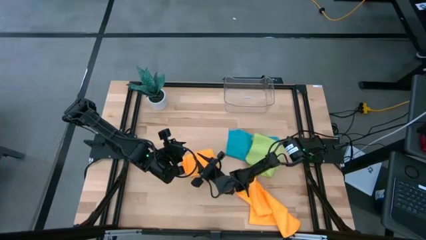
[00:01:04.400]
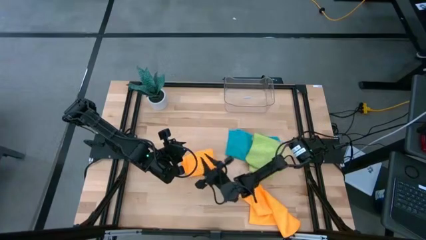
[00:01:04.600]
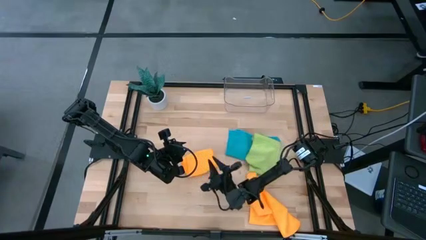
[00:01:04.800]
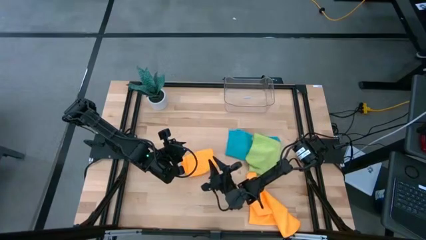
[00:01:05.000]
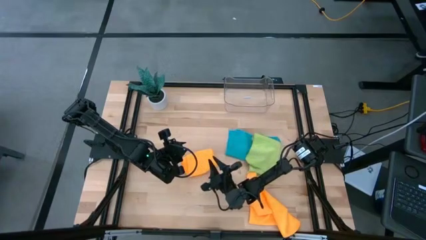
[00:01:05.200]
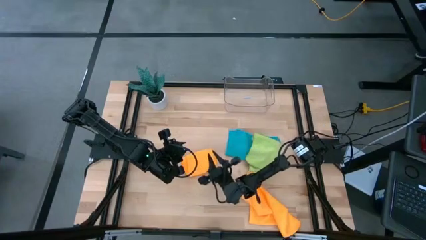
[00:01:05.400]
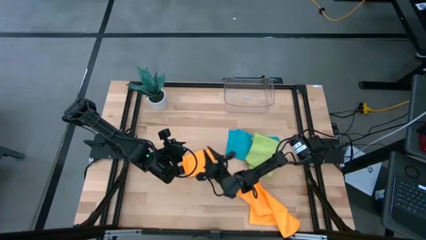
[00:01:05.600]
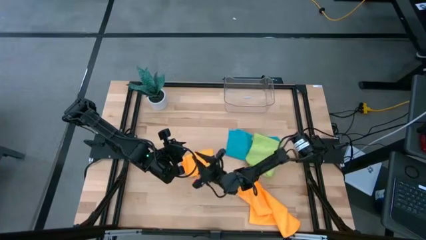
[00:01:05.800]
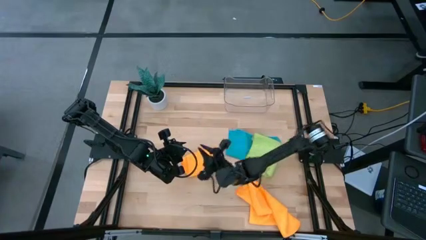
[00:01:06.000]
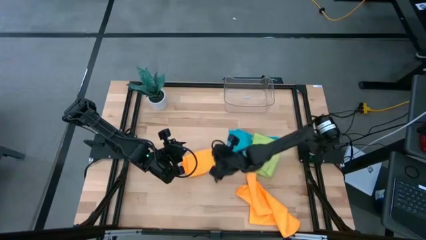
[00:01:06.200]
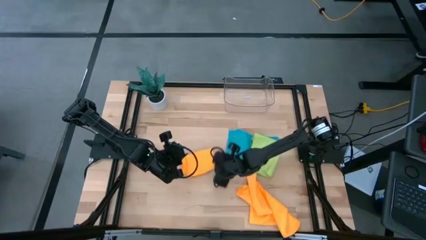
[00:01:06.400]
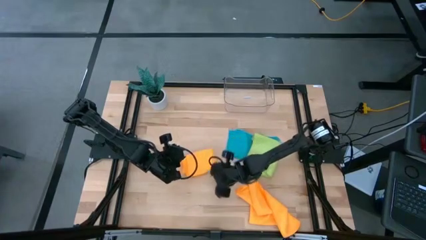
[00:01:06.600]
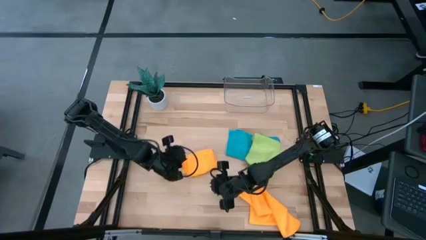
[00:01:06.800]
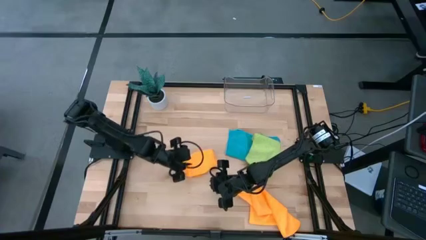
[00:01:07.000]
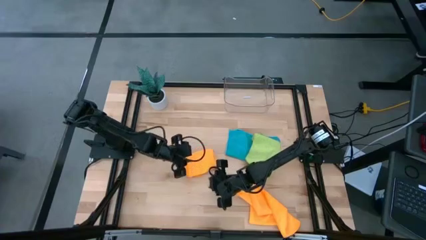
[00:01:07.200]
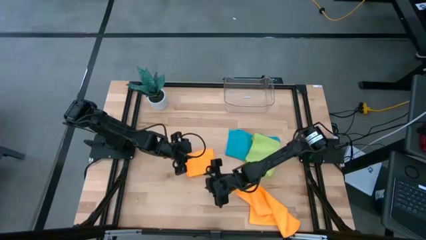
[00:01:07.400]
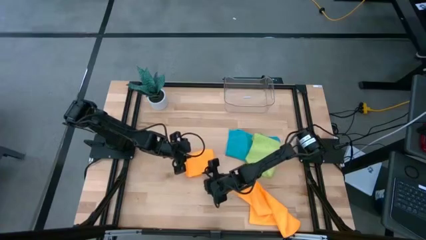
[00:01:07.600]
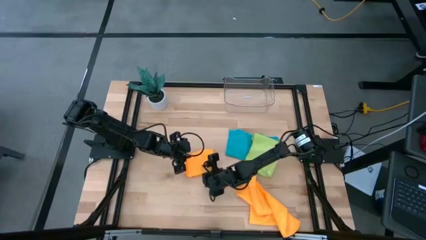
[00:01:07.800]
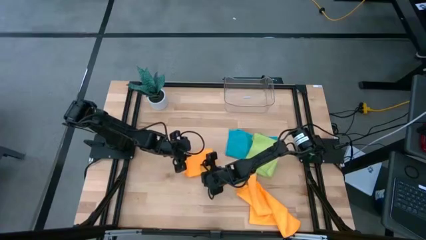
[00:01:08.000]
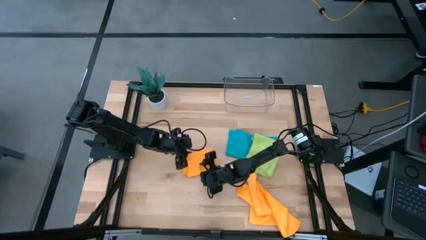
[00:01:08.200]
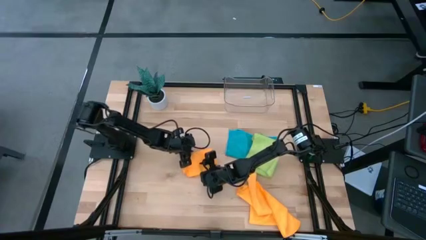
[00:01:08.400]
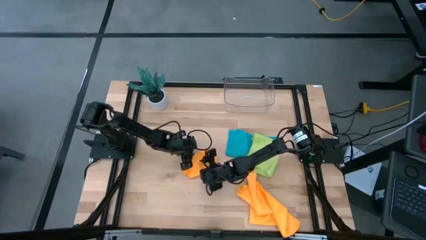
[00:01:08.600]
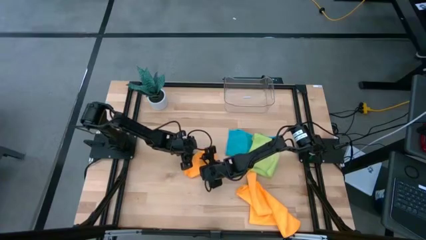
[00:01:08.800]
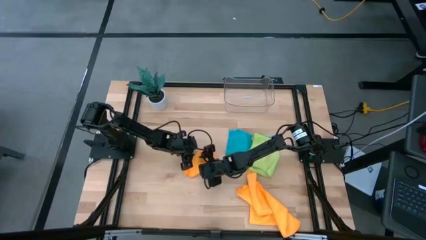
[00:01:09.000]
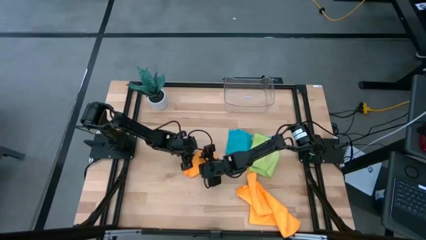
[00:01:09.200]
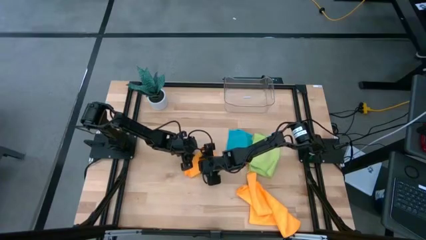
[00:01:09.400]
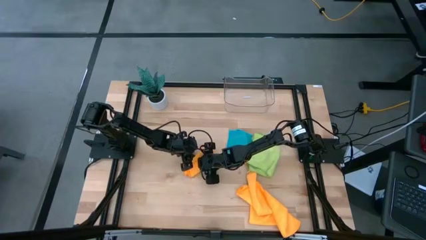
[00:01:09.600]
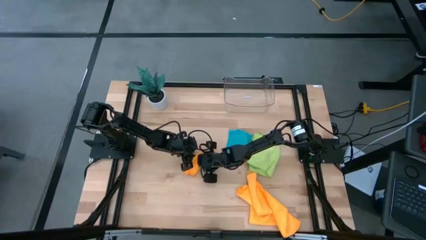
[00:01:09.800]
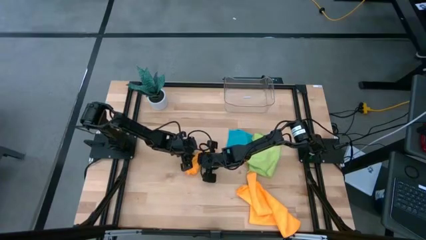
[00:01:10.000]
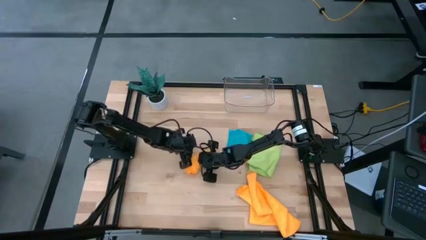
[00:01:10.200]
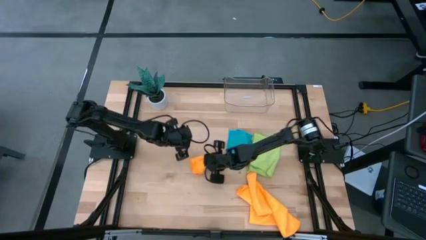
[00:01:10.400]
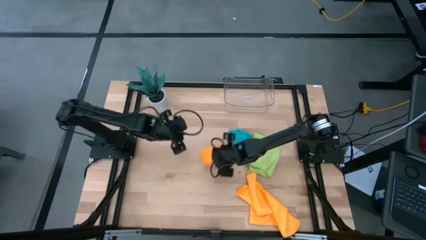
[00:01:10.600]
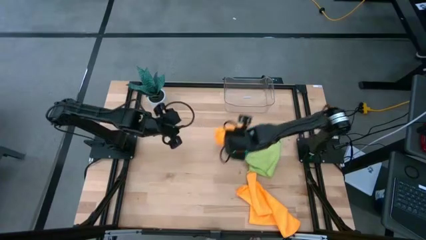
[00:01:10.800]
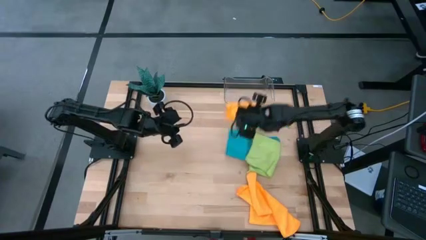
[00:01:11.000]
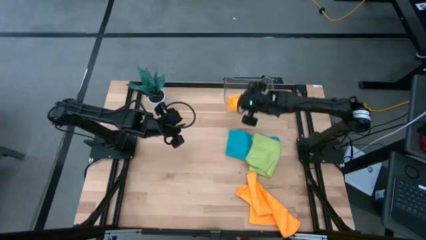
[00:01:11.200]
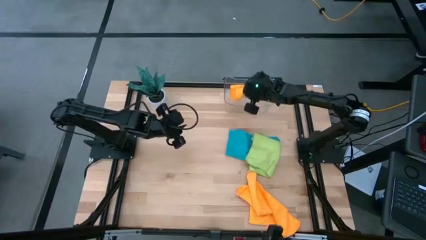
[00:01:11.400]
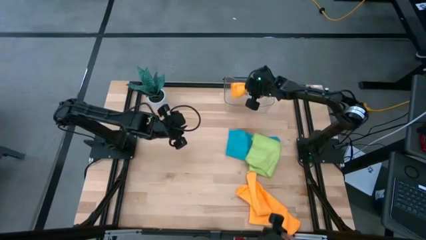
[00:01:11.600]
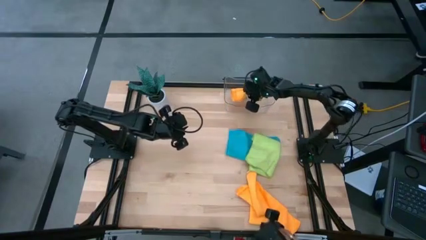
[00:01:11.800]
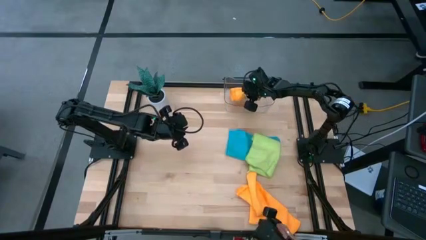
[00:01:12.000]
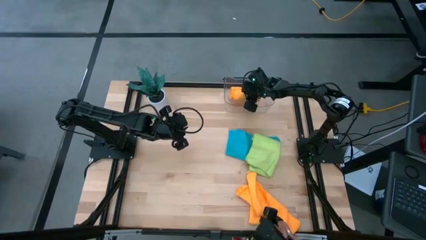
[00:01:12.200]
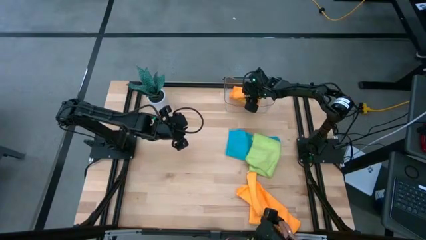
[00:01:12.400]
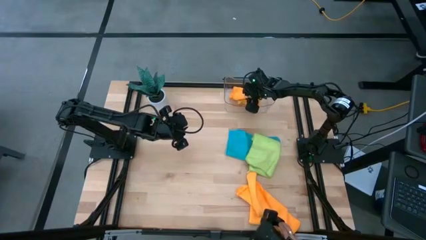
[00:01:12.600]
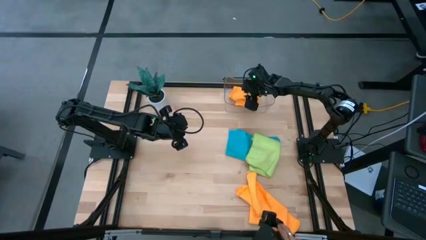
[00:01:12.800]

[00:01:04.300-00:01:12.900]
Task: Fold microfiber towels
Put the folded orange microfiber towel into the transparent bin
